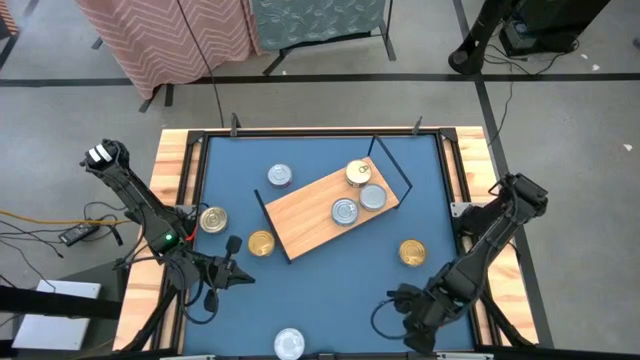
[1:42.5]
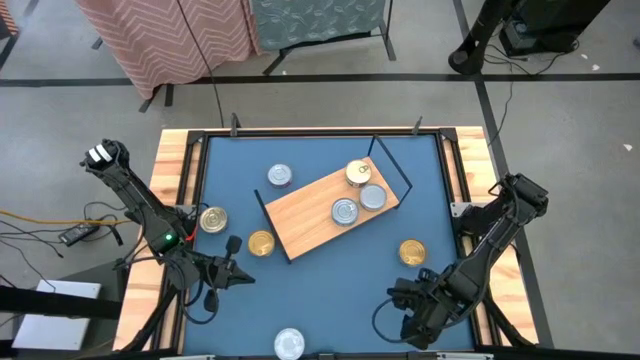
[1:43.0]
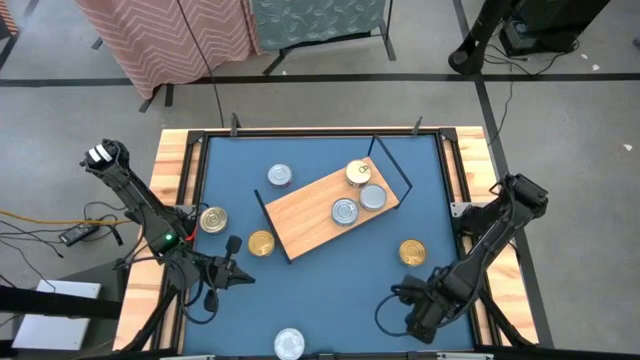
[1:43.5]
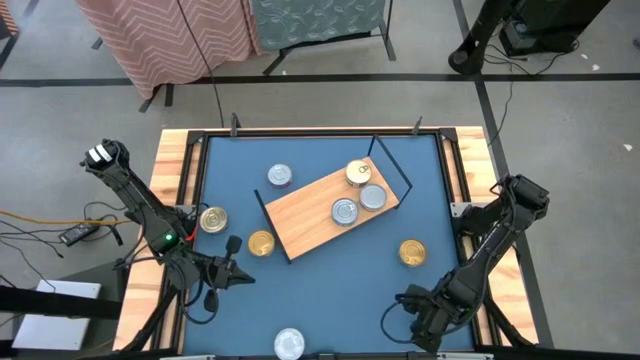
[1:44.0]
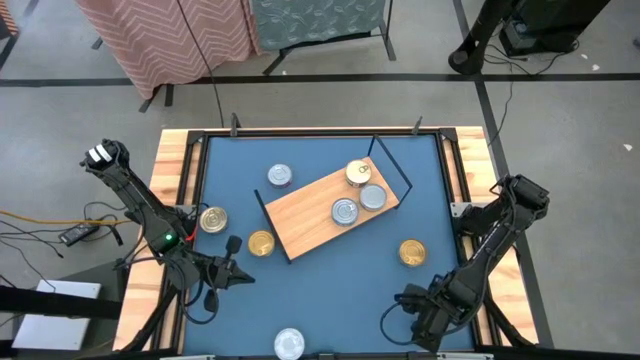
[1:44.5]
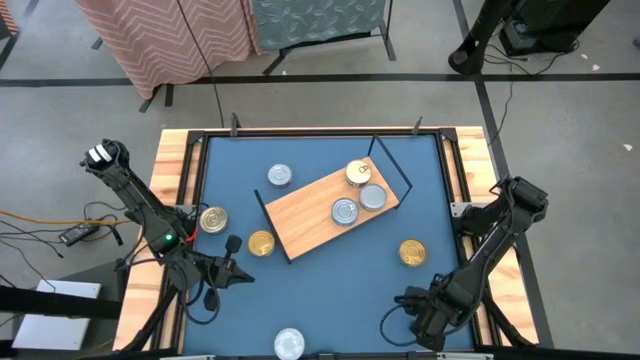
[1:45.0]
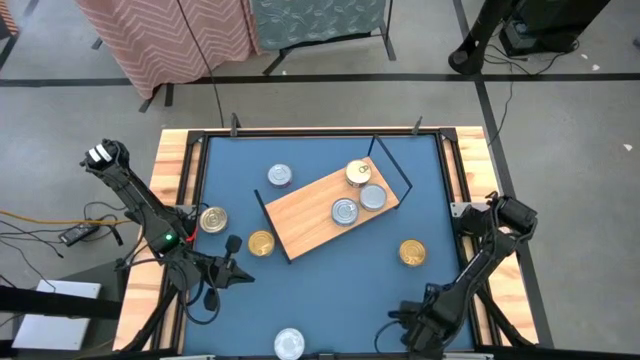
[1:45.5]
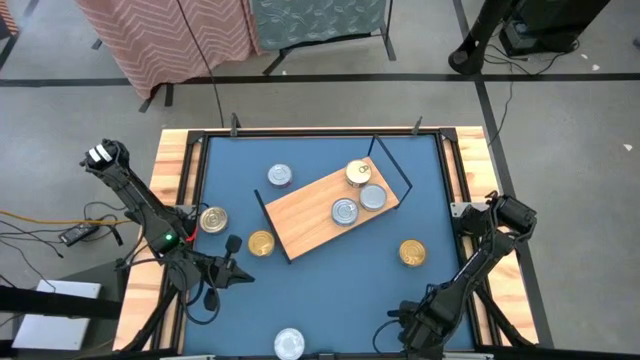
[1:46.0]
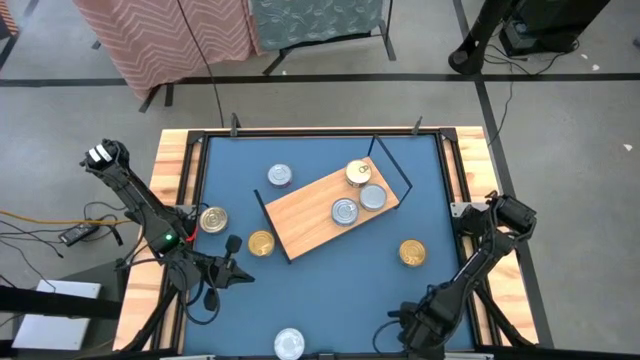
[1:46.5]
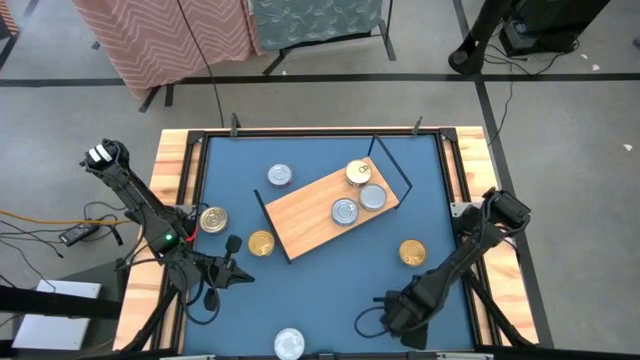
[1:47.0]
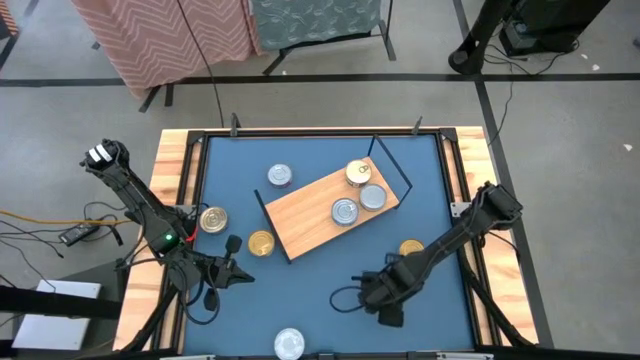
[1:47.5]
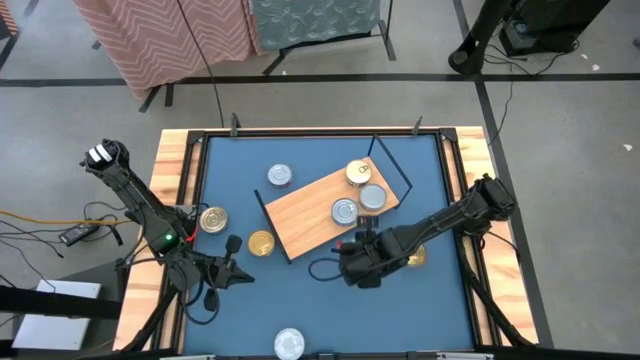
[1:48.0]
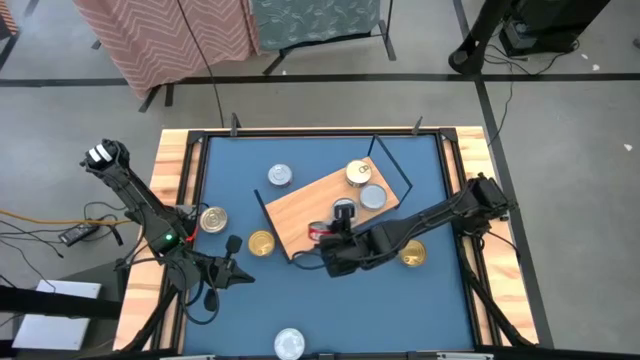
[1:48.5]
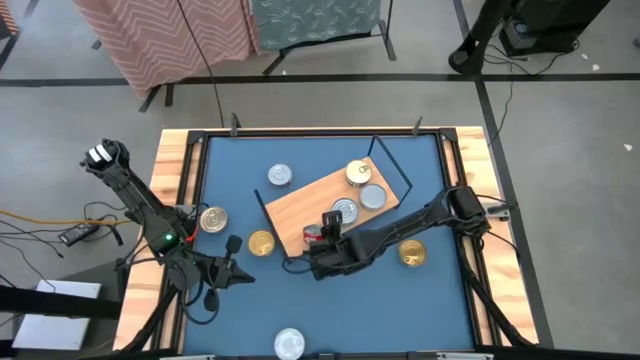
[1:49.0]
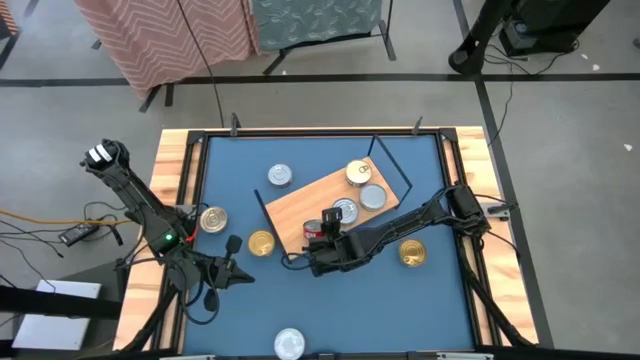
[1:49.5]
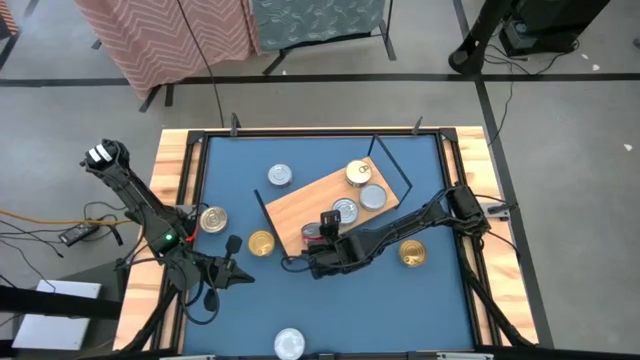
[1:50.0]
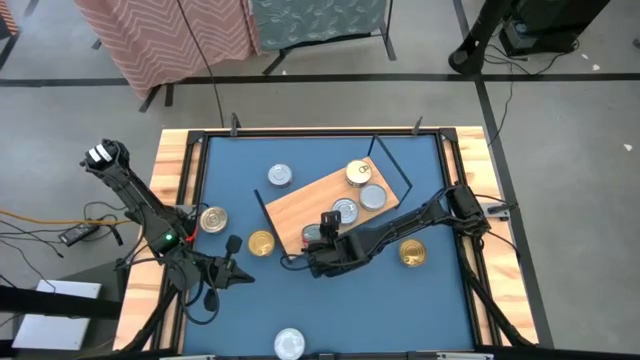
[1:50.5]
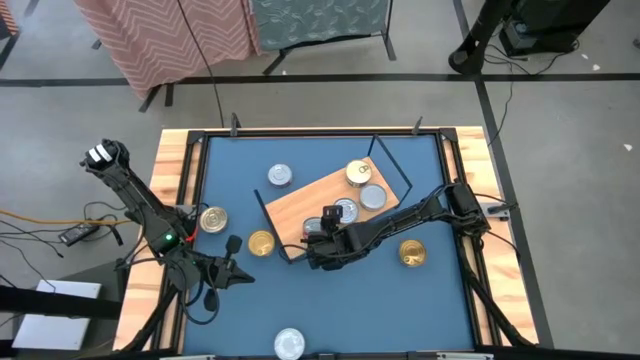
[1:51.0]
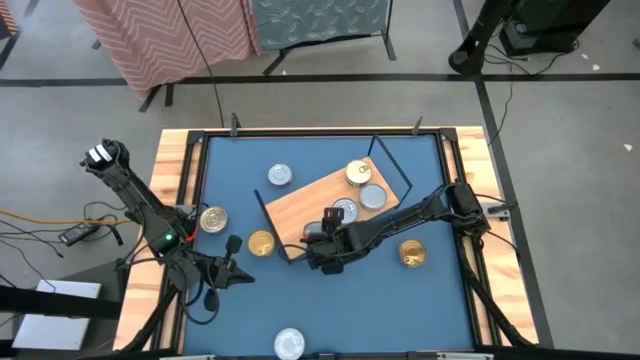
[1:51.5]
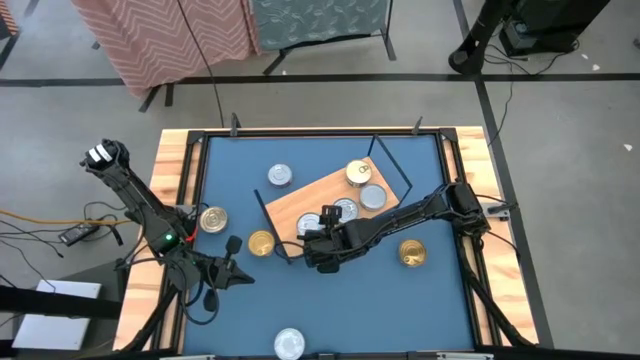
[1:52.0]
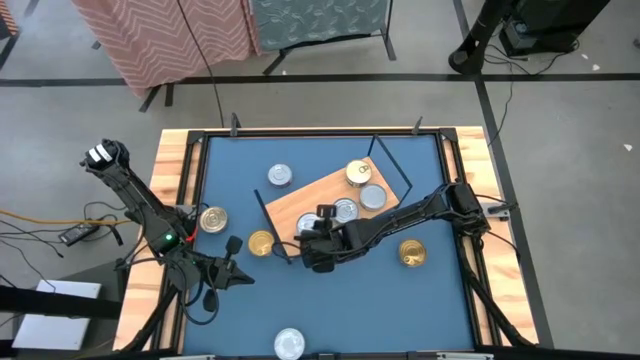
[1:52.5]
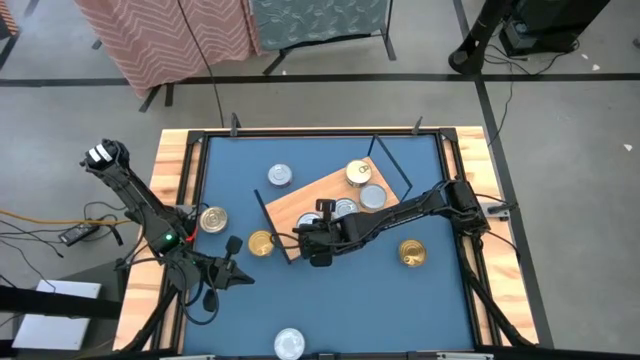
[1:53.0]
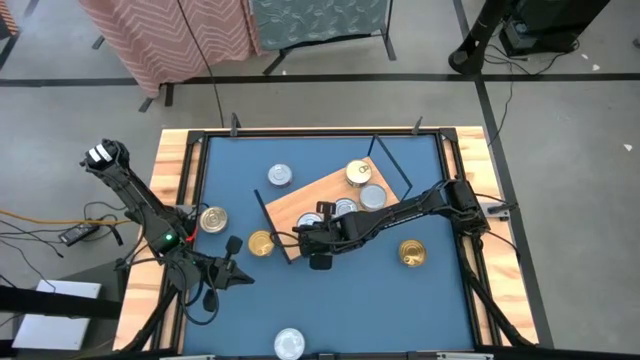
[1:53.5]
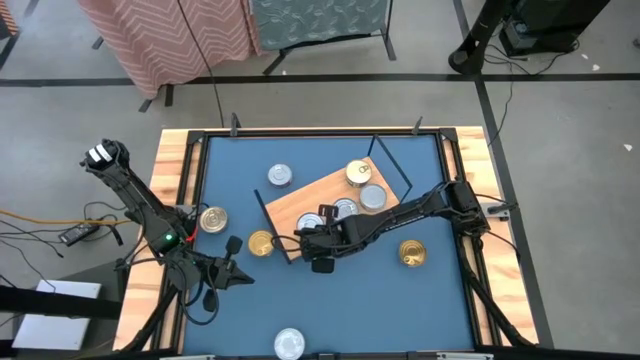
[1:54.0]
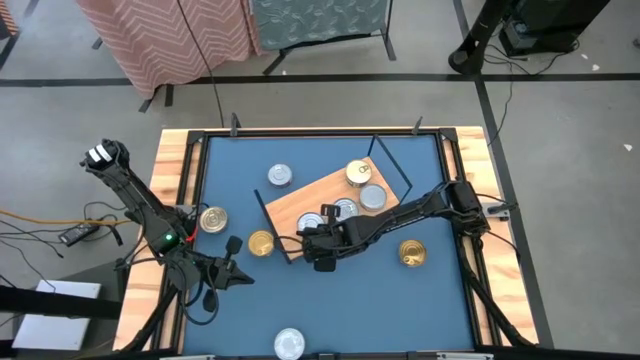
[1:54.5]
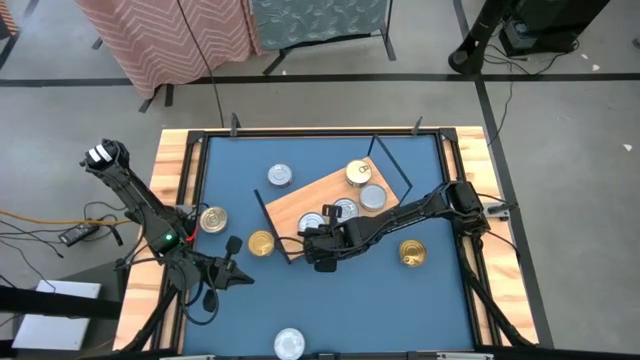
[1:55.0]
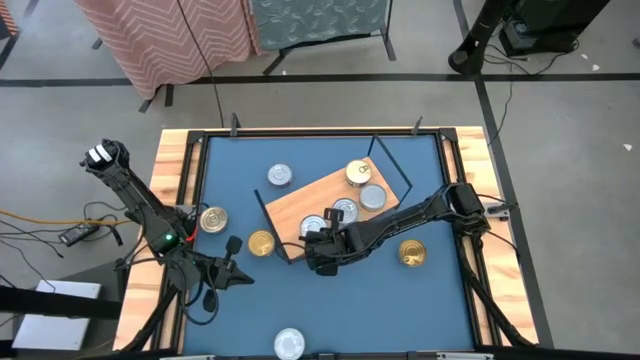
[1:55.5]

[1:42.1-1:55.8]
Task: Stack canned seafood by type on shelf
Put the red tuna can on the shelf

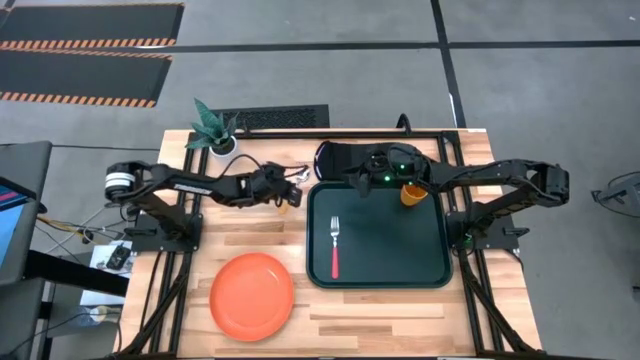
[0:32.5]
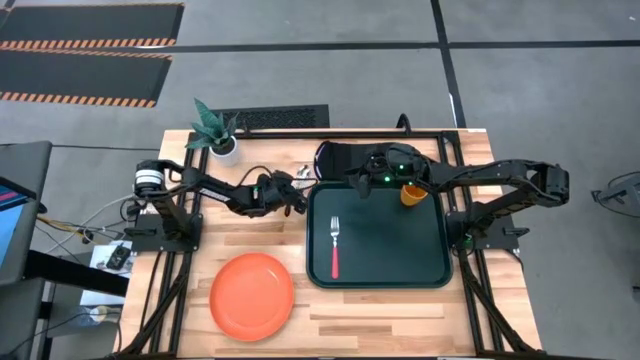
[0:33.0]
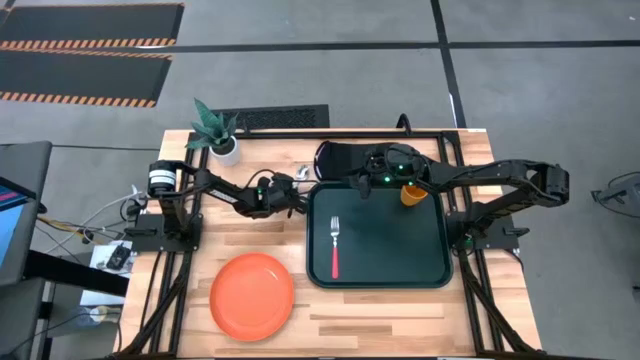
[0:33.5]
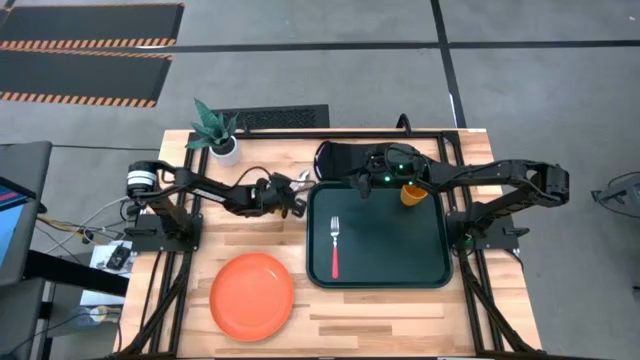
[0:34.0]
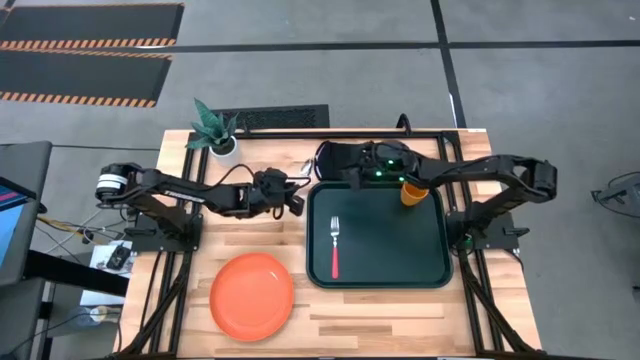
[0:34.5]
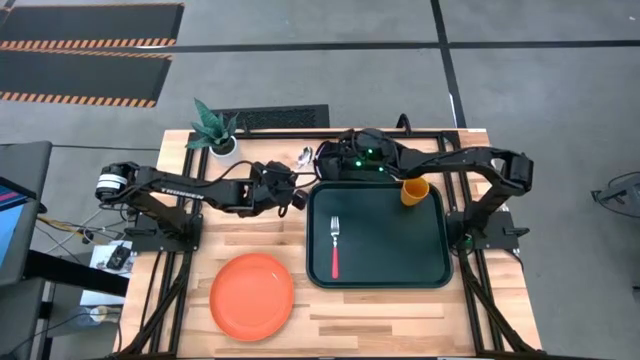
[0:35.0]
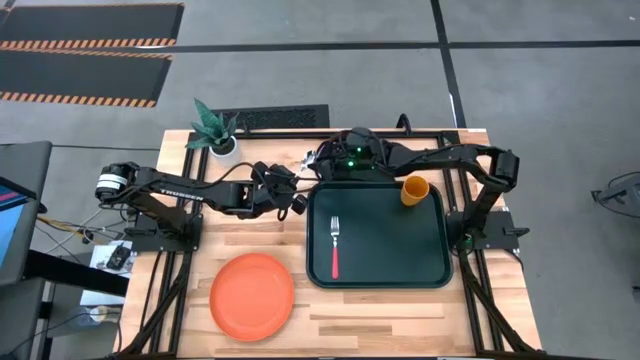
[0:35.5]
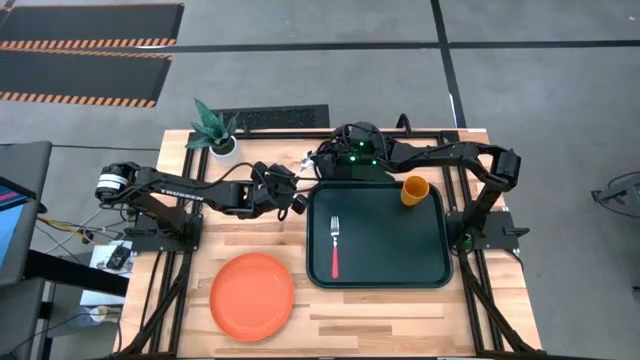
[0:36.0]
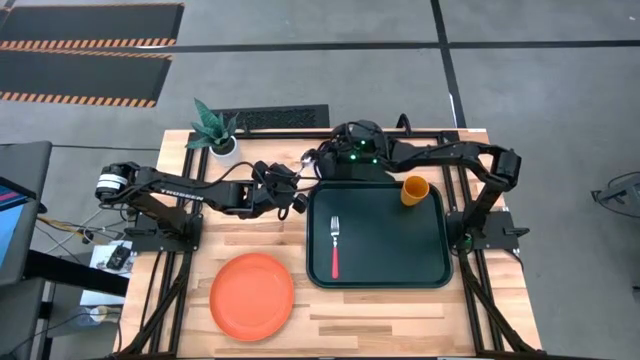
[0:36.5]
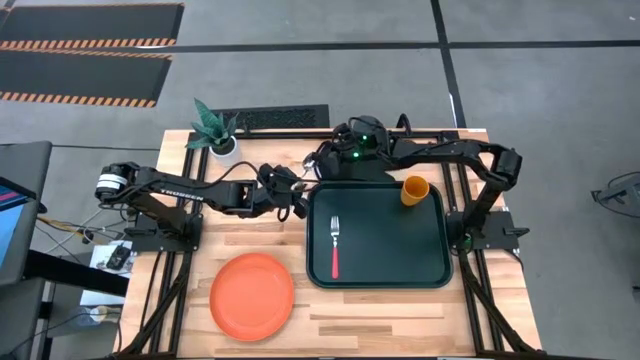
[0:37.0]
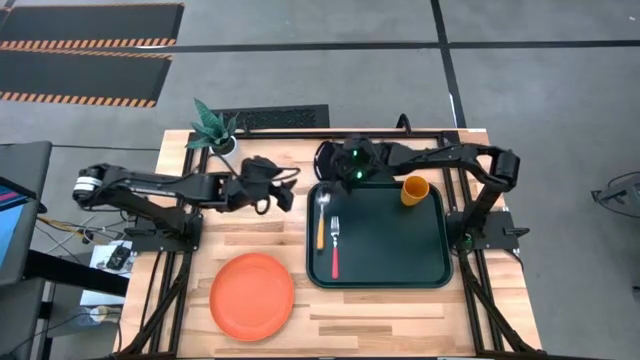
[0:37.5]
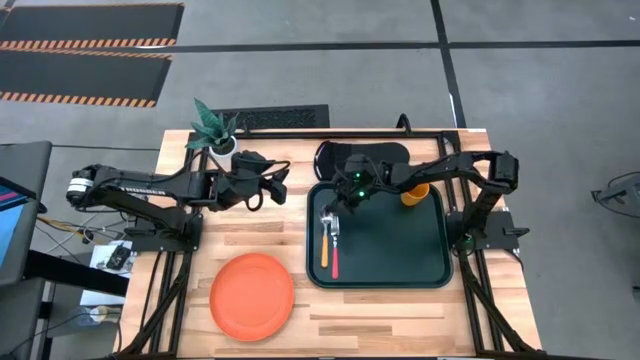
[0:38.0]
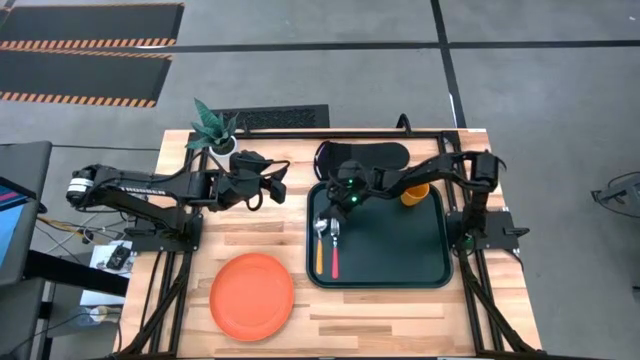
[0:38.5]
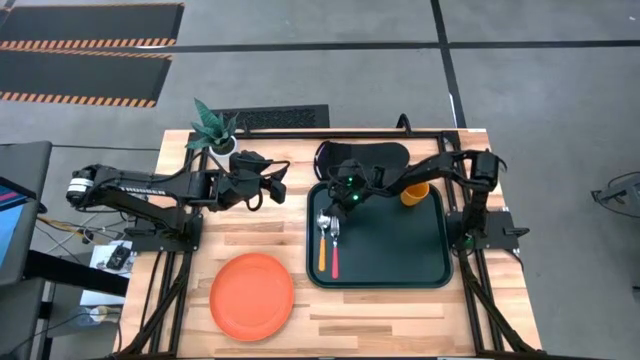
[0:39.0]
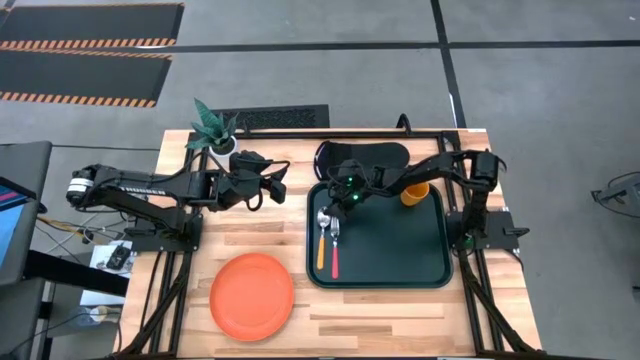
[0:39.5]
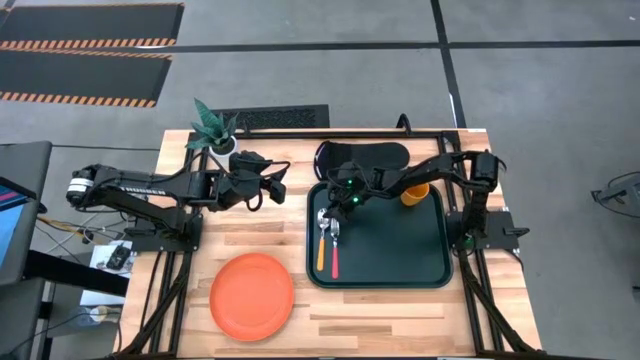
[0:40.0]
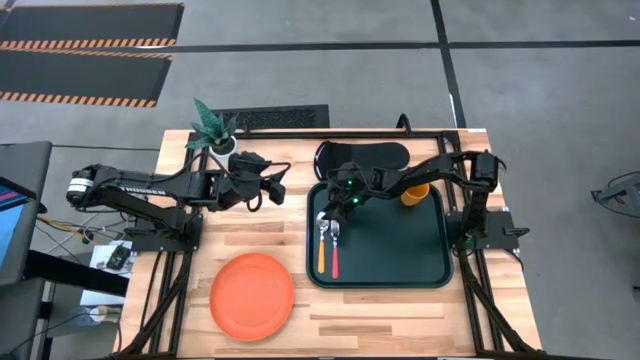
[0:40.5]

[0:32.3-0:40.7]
Task: Pick and place plate/cup/fork/spoon on tray
Put the yellow spoon to the left of the pink fork on the green serving tray
